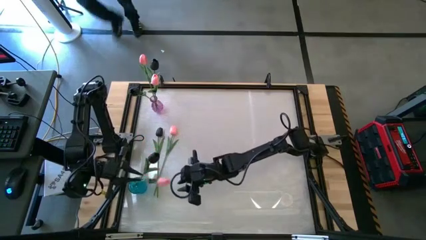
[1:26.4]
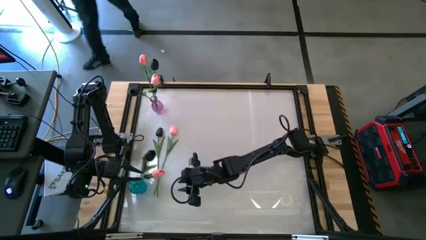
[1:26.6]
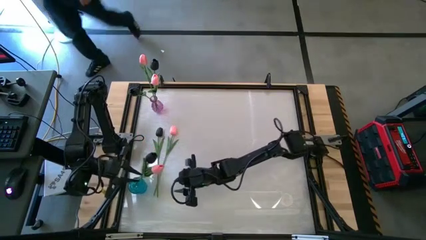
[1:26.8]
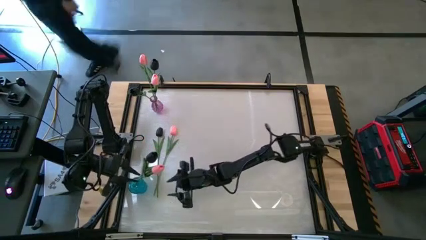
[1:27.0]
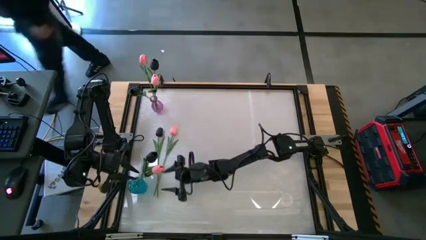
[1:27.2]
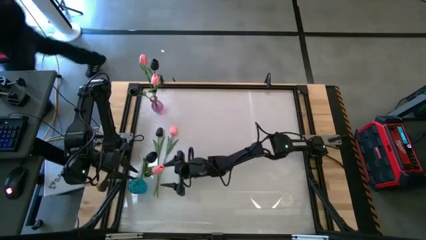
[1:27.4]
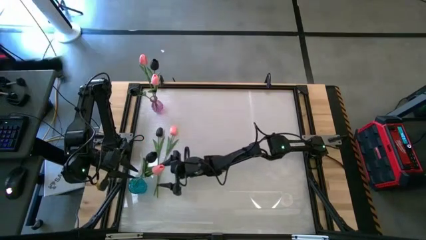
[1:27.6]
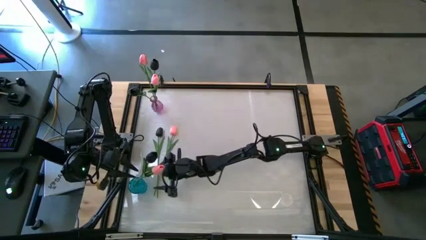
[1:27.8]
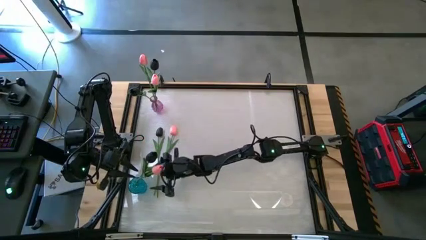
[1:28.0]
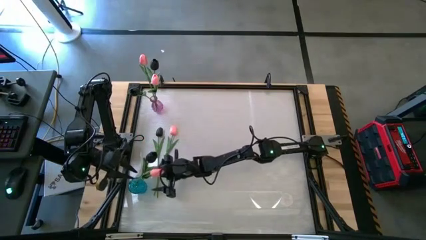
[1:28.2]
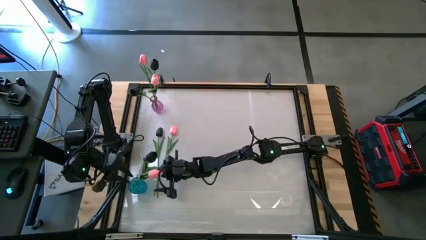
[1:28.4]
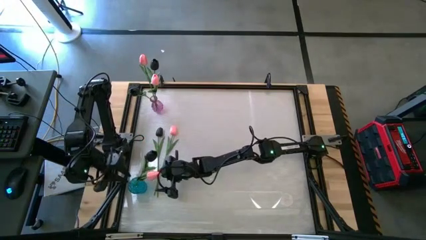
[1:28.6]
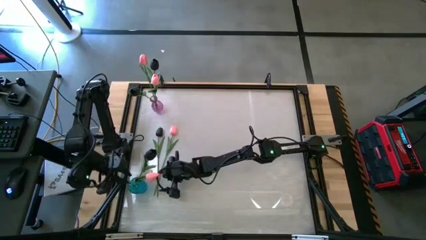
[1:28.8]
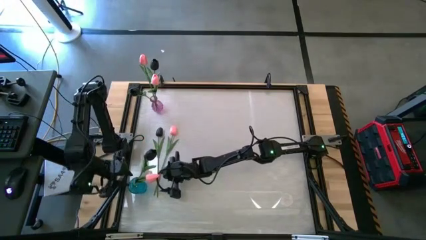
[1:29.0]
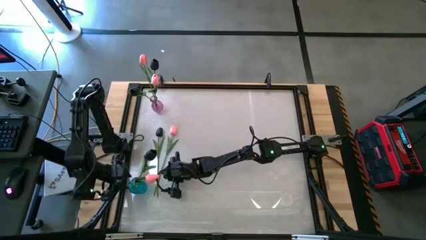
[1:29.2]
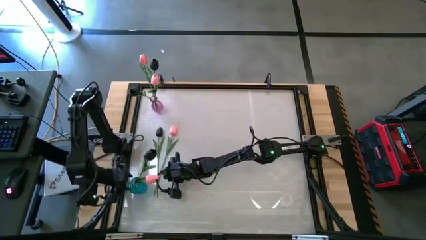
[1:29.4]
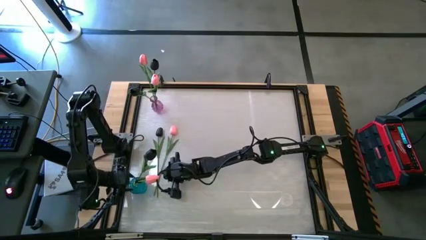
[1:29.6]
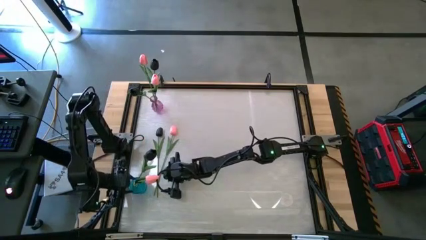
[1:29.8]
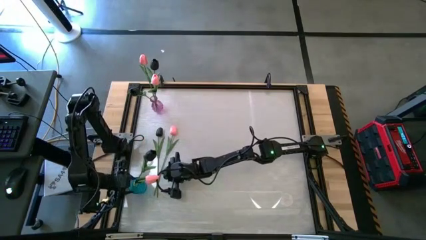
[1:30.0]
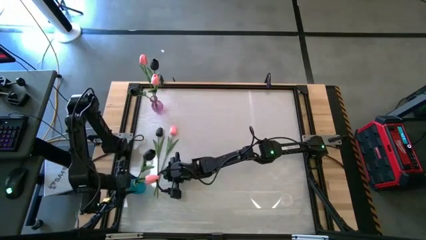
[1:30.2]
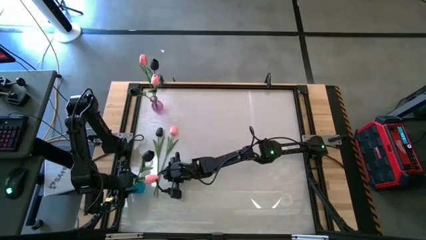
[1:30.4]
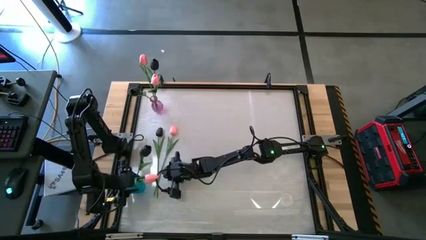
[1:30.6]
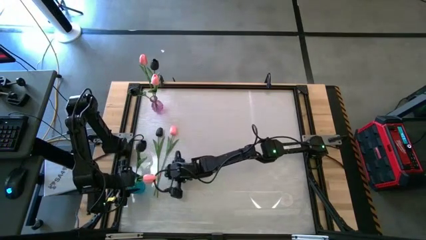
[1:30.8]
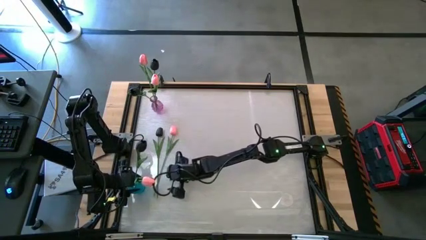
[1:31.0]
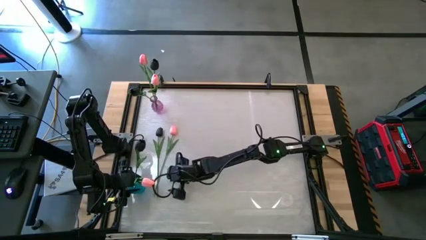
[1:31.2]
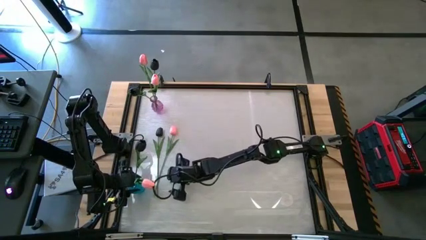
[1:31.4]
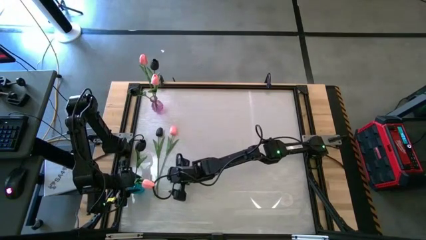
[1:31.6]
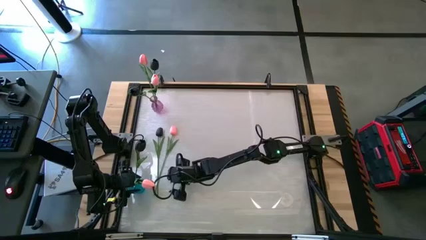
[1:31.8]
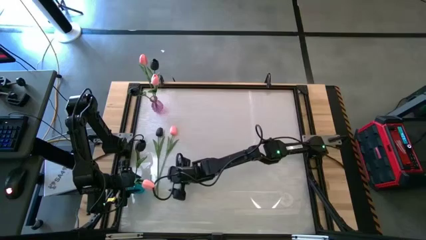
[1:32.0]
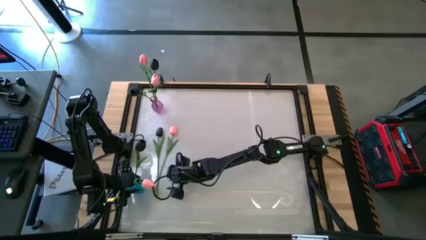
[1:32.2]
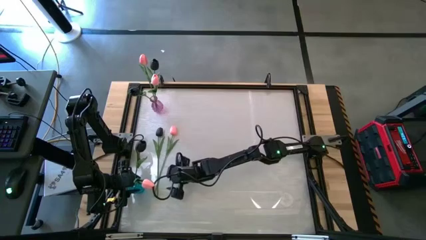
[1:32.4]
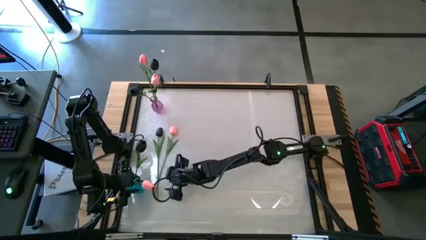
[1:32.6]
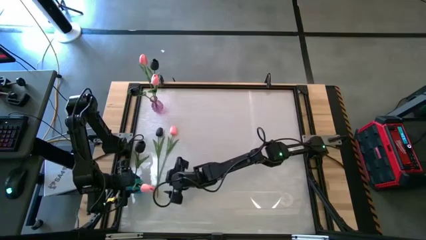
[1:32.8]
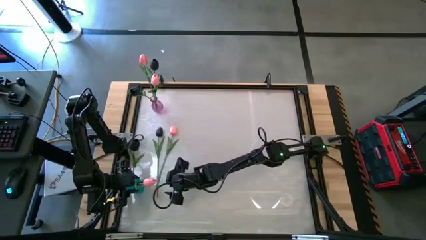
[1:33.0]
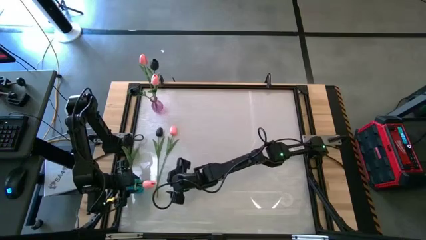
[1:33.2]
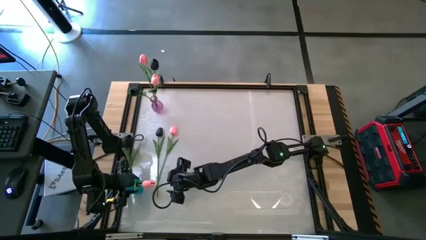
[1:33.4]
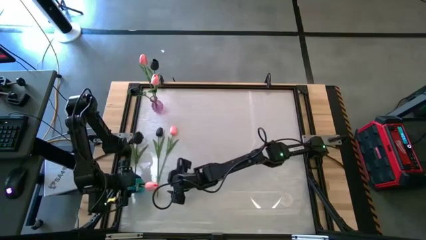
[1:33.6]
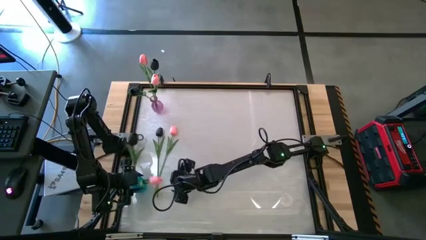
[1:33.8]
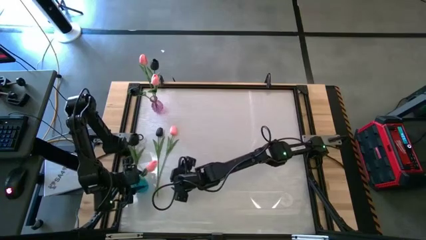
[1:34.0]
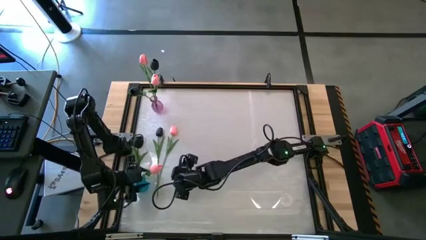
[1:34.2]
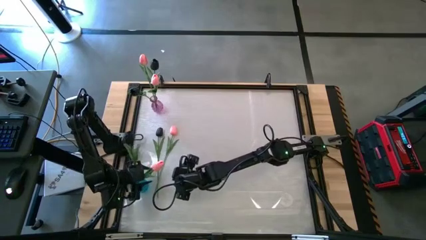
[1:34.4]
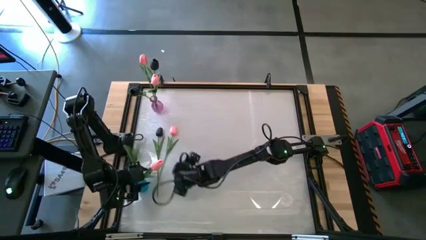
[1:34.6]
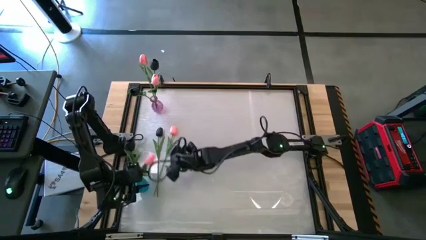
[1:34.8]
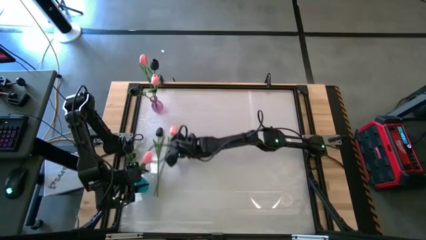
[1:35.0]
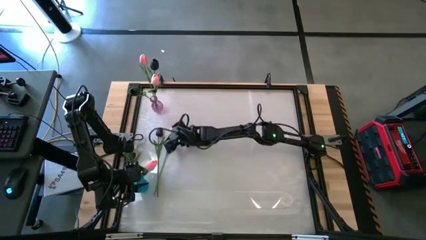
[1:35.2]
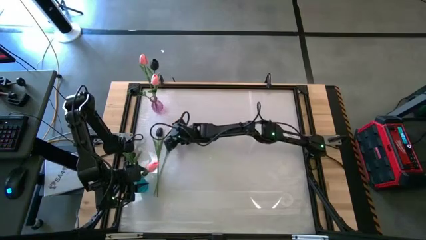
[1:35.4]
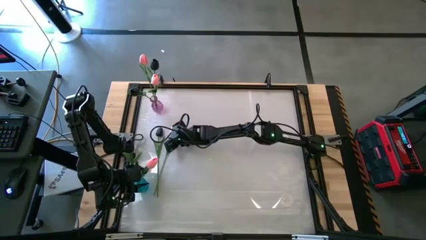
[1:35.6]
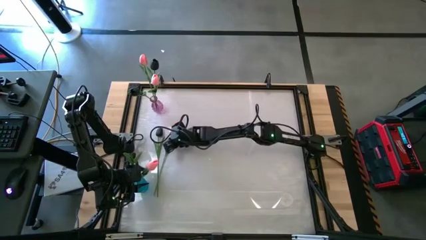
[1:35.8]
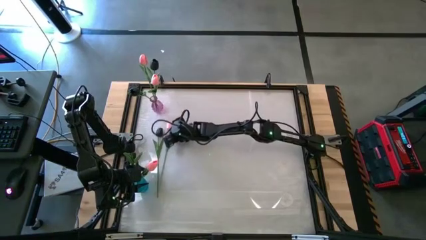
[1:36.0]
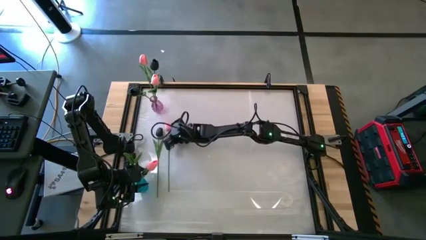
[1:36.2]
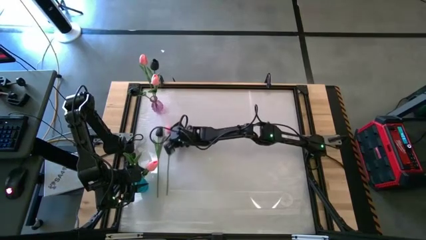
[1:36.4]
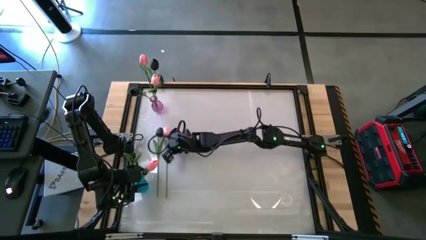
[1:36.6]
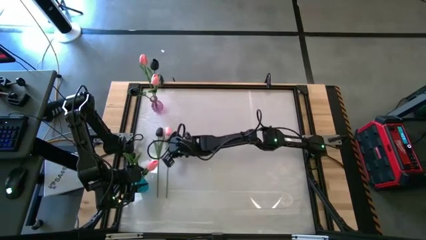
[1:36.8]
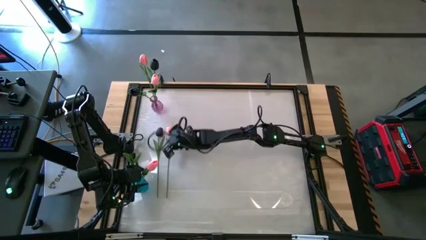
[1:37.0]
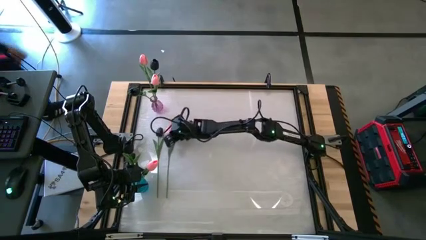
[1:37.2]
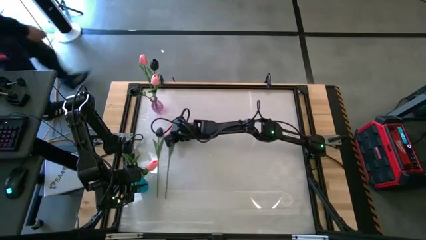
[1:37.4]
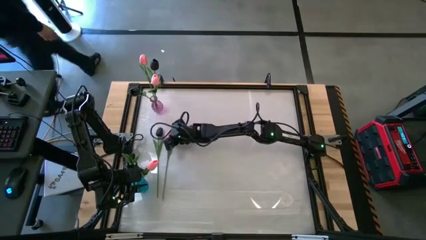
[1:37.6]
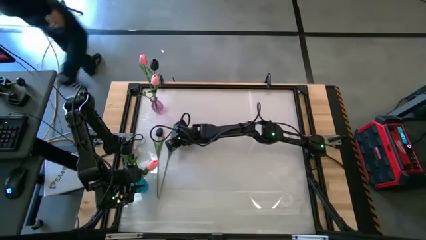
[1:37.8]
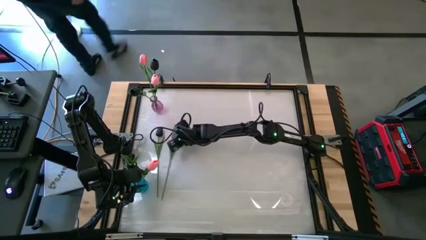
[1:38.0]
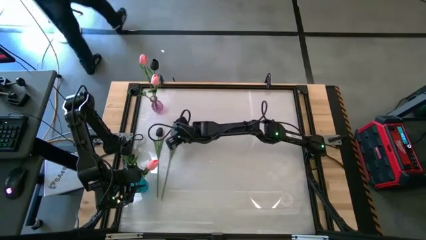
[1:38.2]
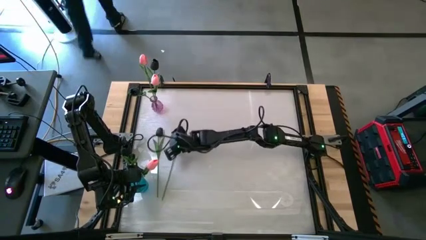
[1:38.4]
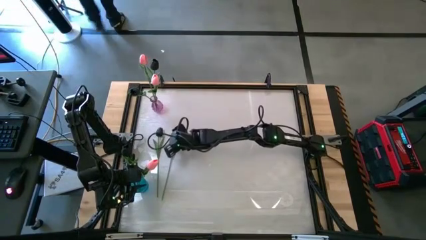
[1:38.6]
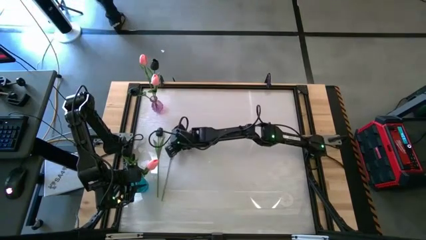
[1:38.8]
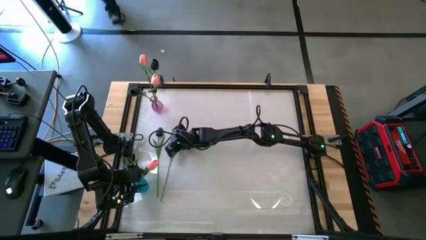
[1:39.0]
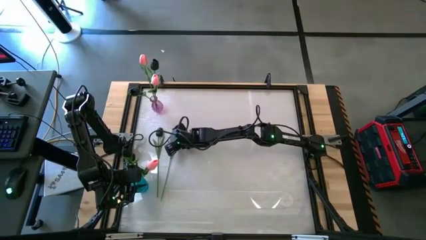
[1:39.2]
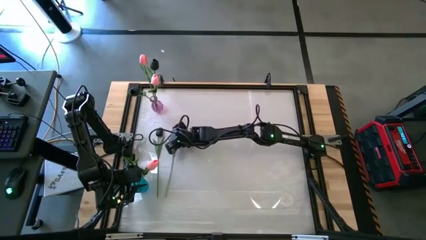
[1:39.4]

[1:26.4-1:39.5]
Task: Sort flowers into vase by color
Put the pink flower into the blue glass vase

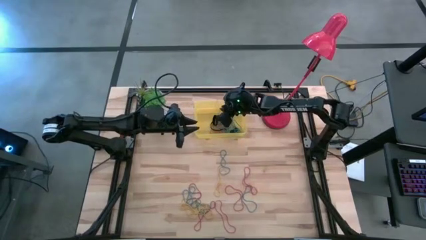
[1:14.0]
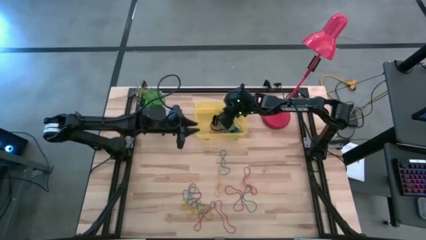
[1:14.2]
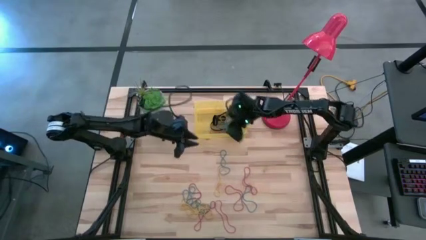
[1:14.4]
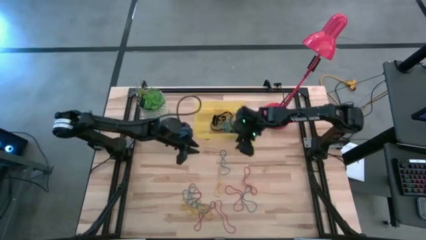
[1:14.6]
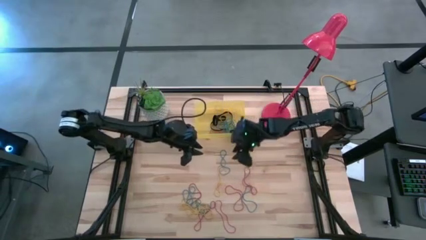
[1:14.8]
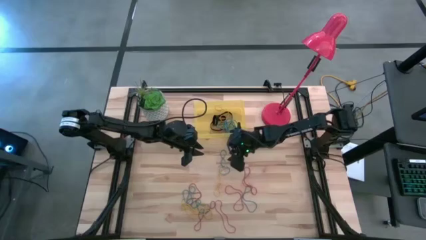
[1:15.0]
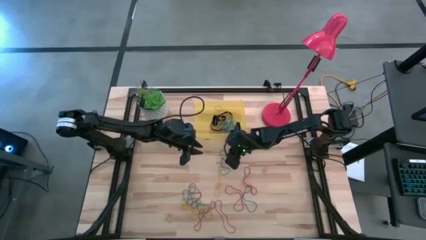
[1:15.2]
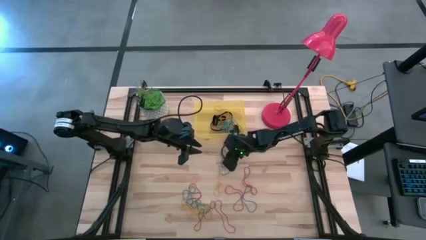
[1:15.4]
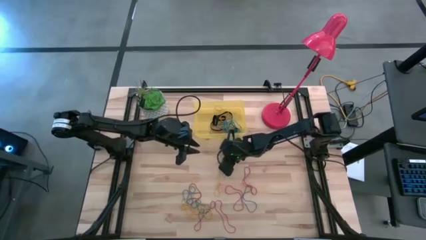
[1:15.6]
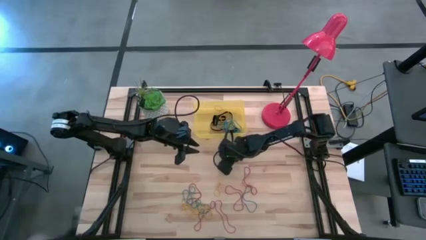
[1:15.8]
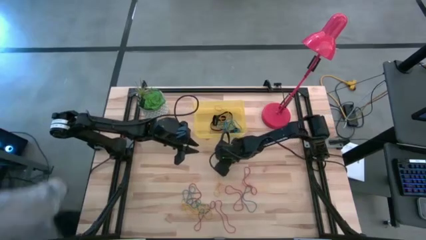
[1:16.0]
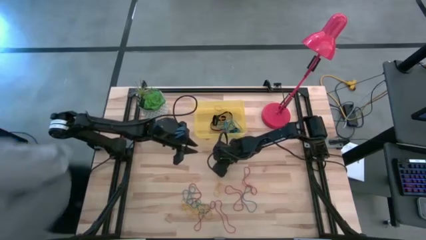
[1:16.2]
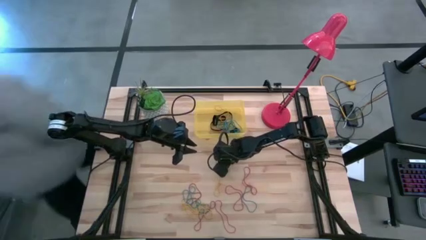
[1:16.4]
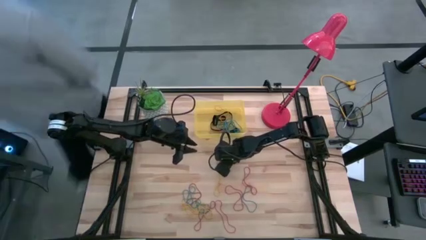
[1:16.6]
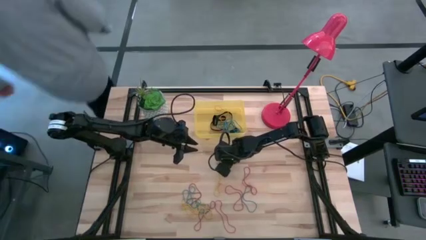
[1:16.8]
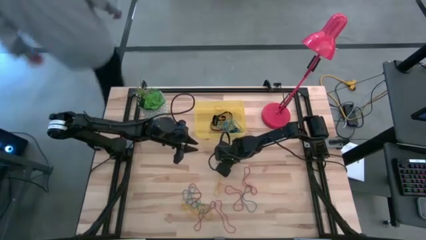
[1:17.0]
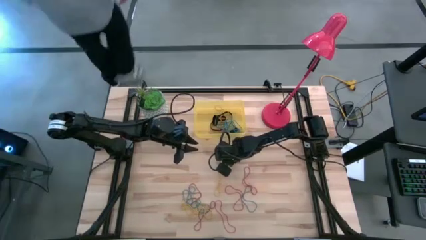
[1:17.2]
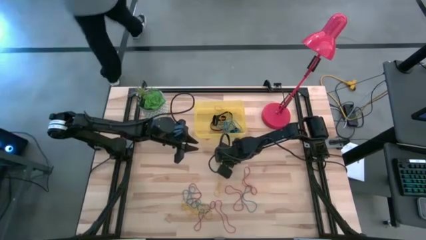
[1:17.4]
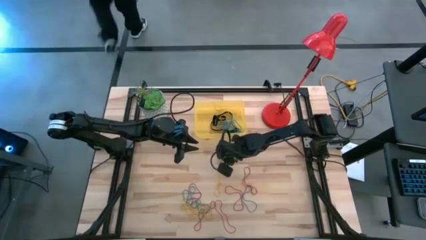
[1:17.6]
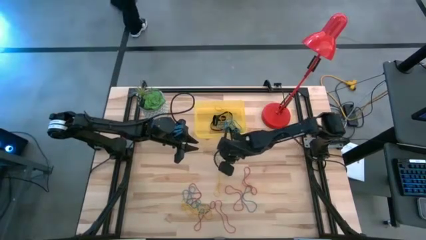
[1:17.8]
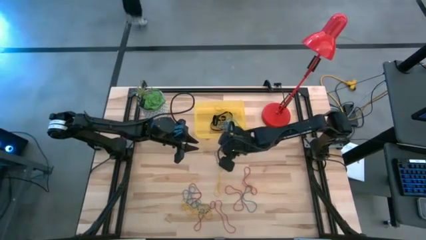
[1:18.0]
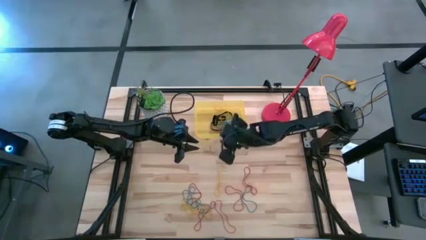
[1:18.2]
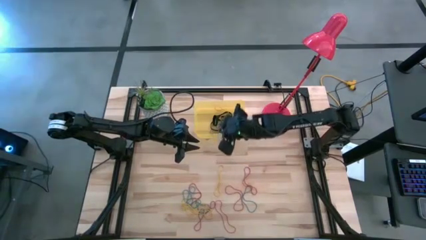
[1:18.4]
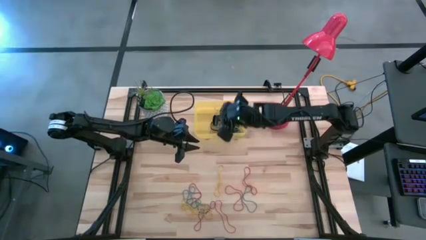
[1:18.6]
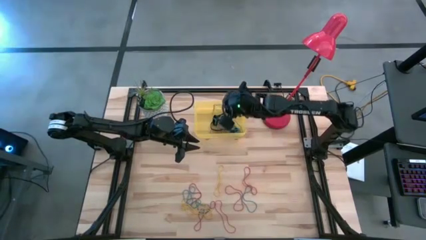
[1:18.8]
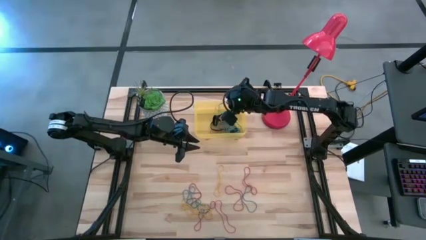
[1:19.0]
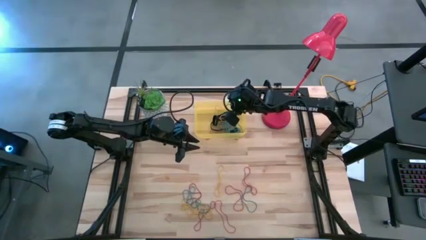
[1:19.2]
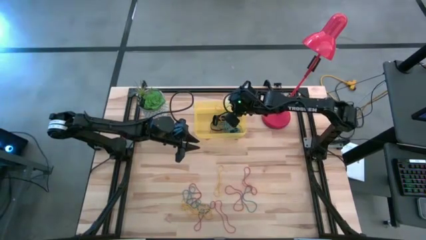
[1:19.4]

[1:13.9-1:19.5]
Task: Pick and place rubber bands into bin
Put the blue rubber band into the yellow bin
